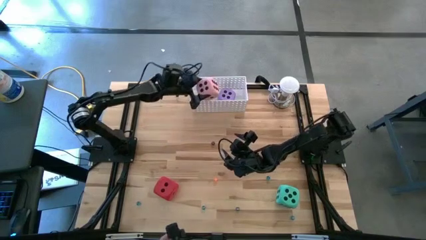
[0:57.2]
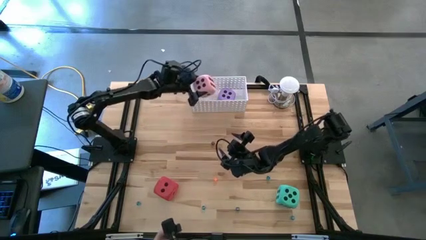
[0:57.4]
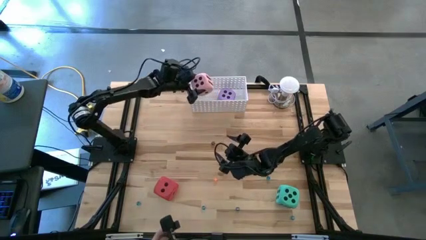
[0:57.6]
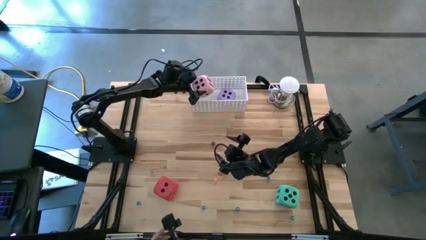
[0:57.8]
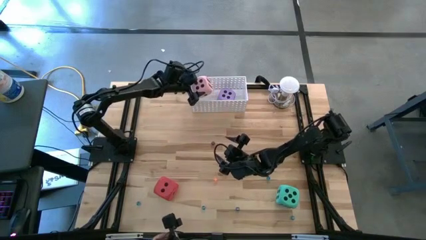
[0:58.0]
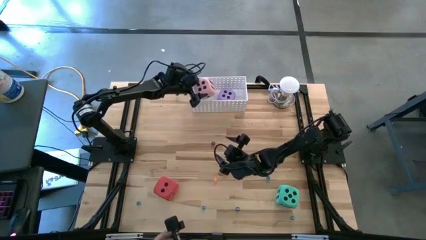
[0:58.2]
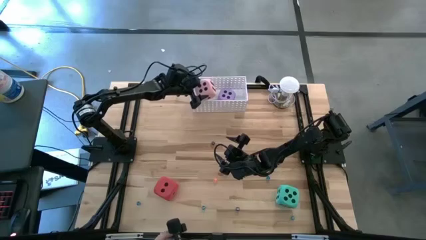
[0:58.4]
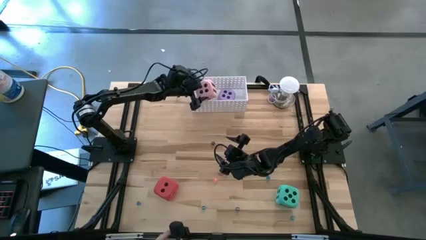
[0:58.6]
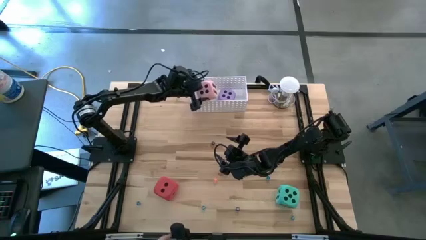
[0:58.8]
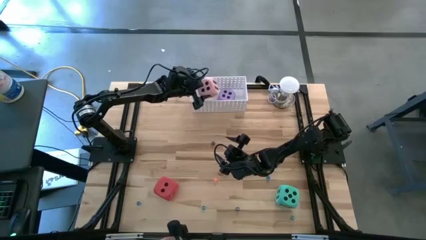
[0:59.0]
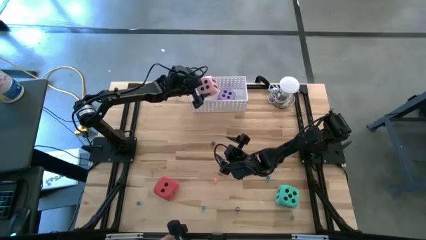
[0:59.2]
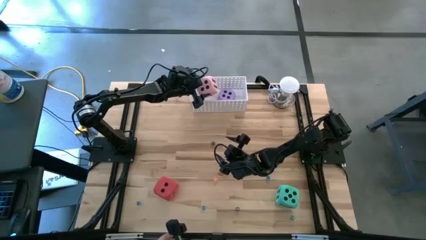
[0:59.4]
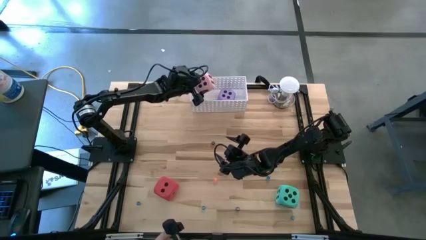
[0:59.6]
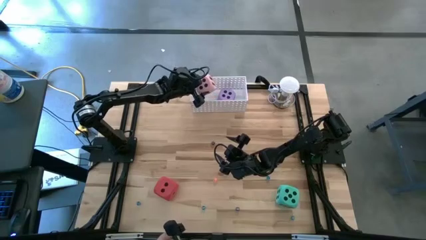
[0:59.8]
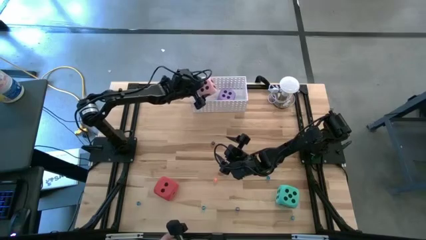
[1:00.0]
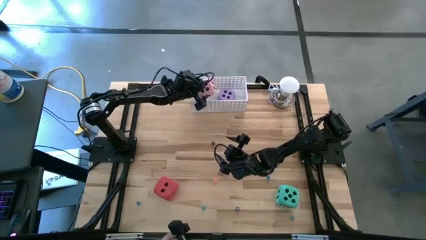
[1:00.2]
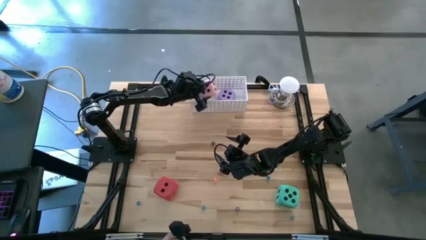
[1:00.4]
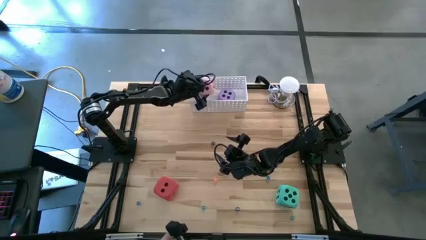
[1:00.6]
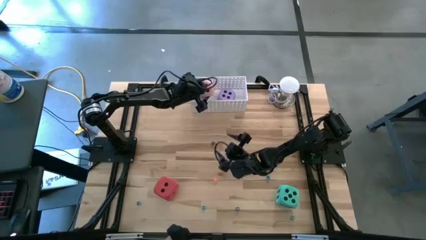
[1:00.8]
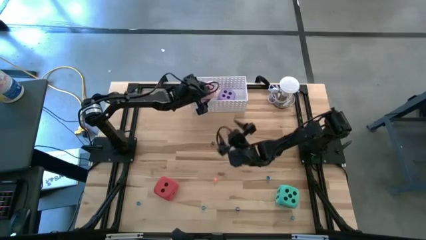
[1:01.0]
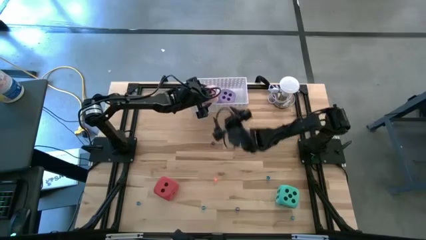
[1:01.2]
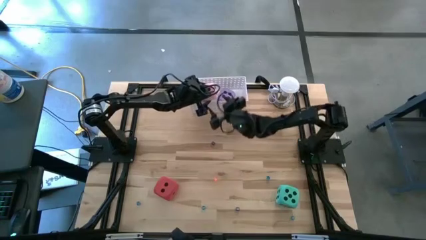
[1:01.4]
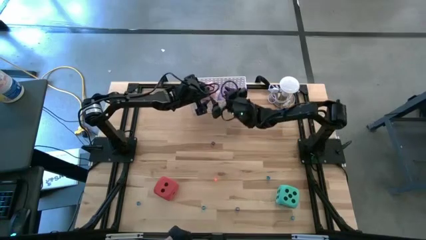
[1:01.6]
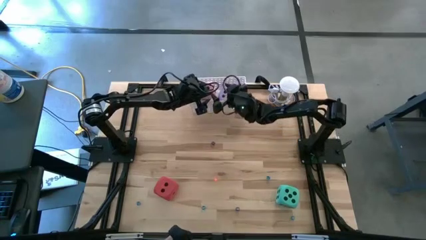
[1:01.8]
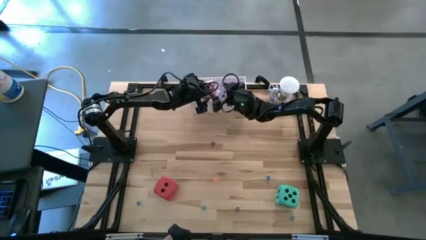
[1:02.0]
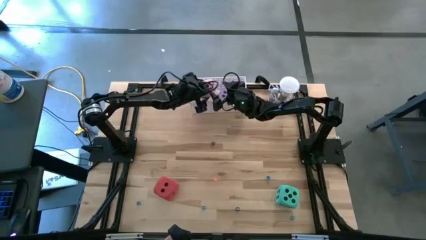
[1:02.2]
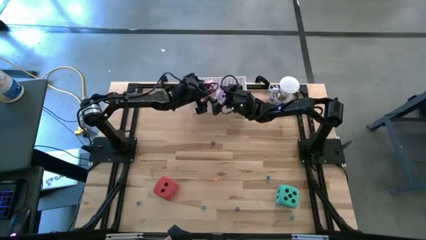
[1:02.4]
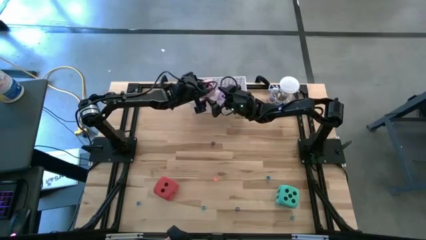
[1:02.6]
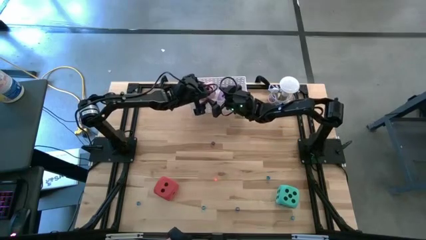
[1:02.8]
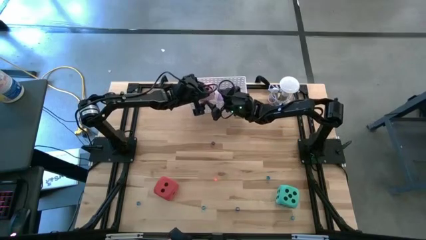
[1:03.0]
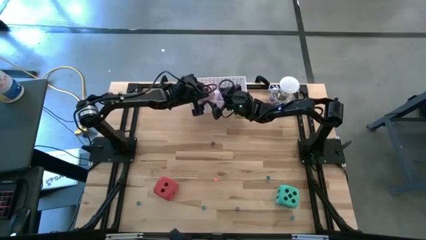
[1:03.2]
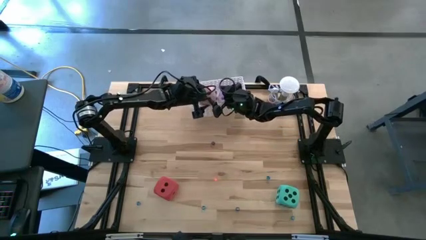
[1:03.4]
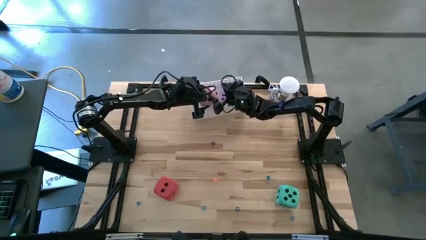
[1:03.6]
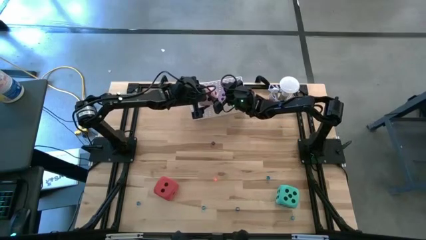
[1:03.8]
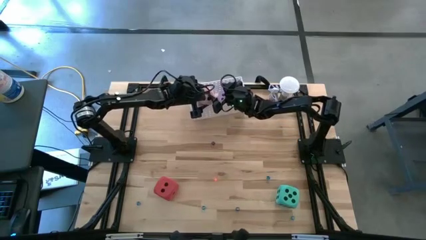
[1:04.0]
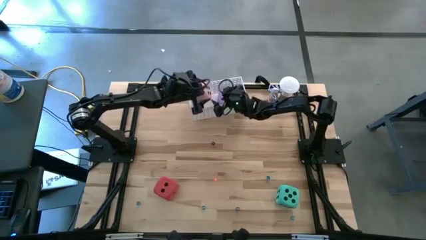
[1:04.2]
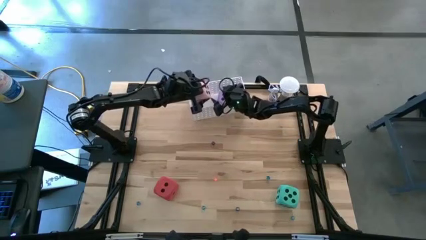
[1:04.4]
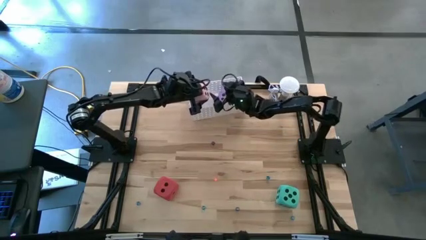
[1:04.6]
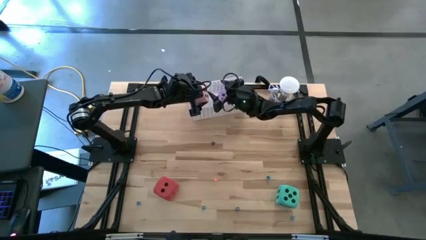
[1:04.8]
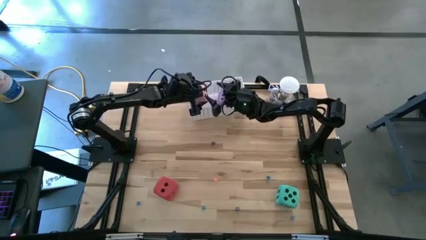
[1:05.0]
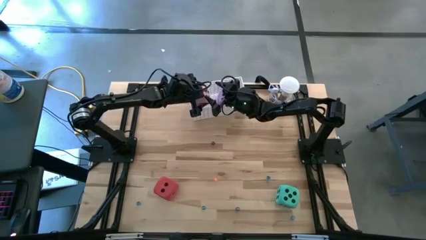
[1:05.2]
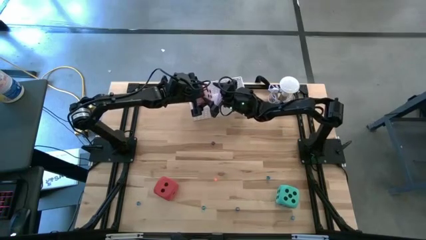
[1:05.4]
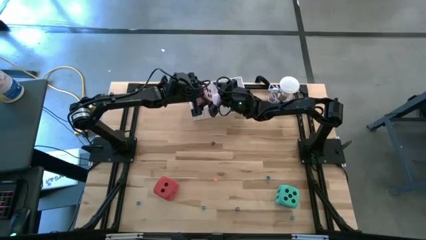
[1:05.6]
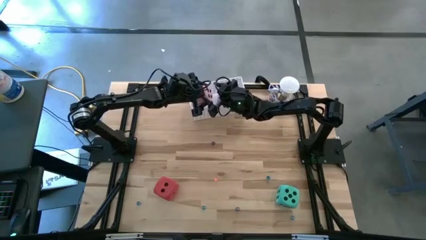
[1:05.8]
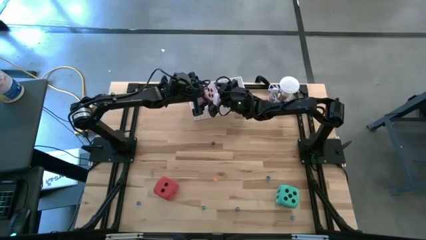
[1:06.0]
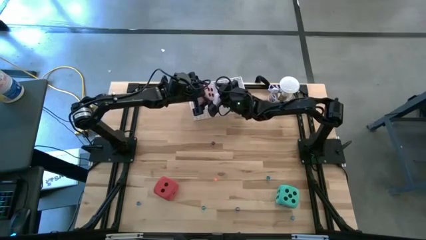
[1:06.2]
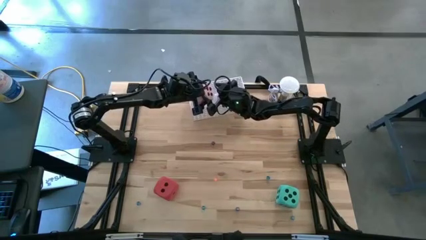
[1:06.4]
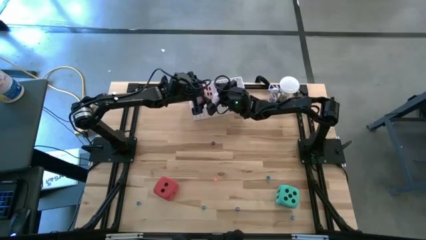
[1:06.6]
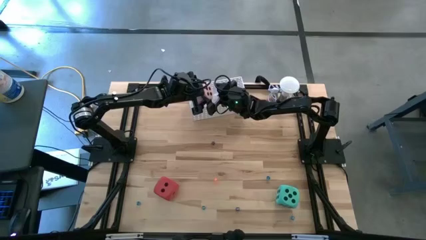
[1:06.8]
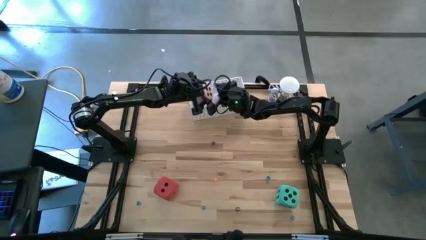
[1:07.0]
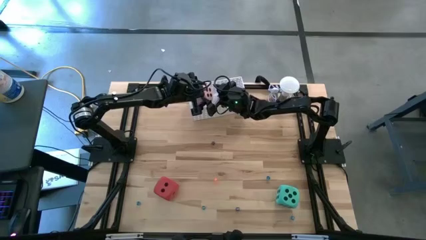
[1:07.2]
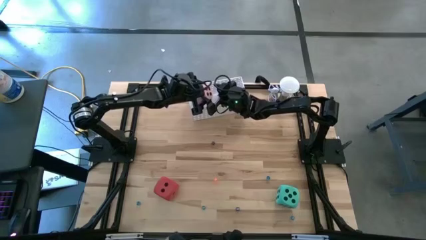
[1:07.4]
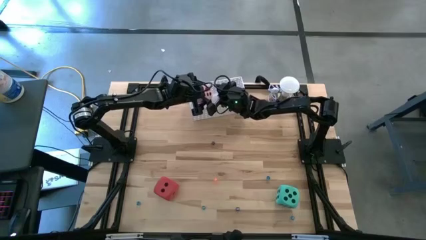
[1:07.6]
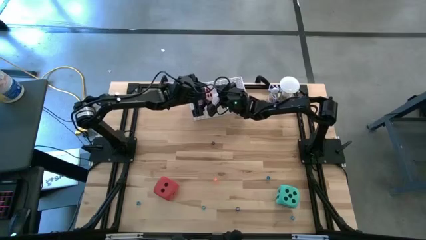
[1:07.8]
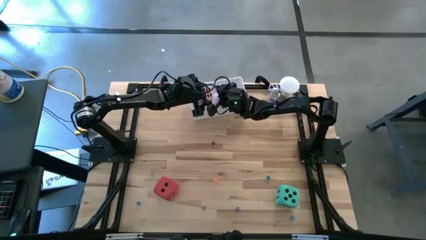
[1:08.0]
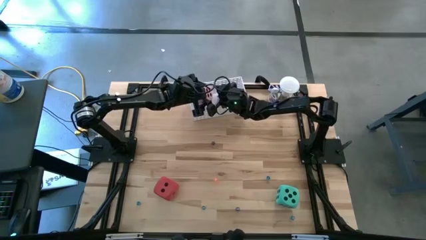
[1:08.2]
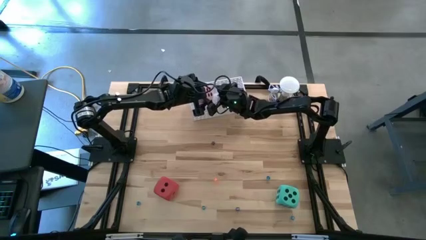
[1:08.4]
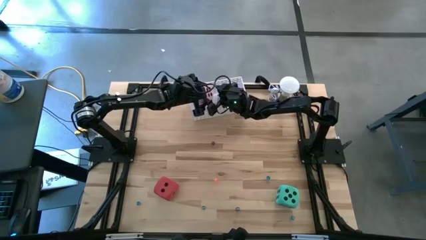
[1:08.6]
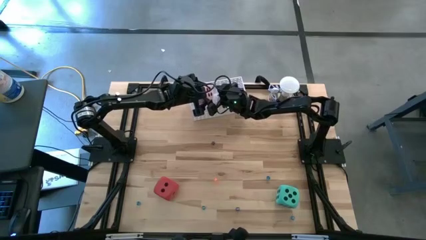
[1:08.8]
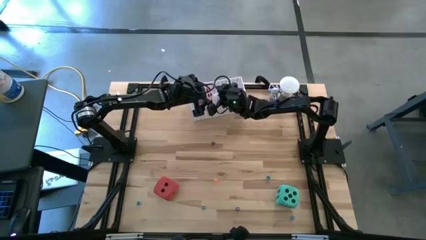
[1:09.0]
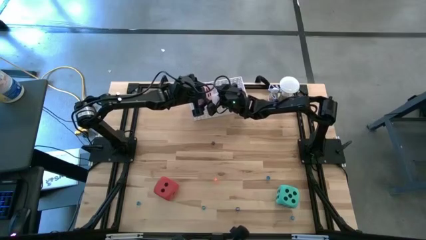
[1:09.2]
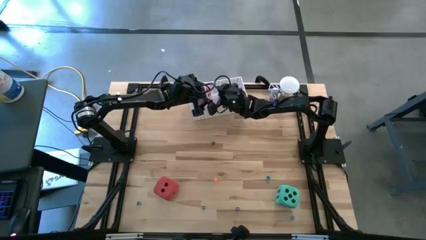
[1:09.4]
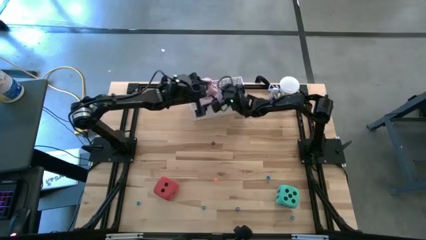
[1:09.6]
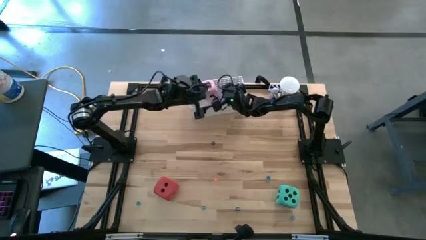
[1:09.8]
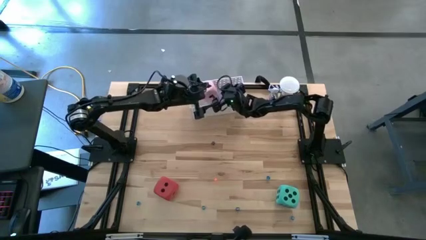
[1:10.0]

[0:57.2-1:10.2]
Task: Pick & Place Dice
Put the large pink dice into the white bin
